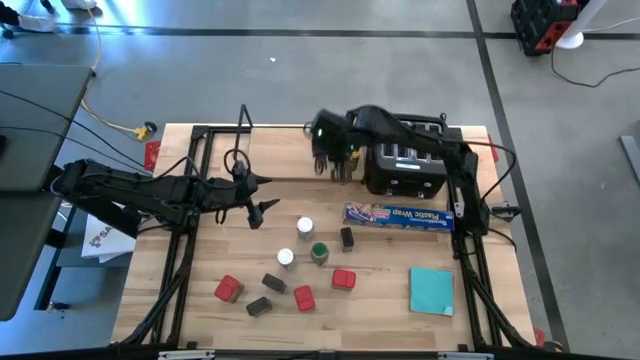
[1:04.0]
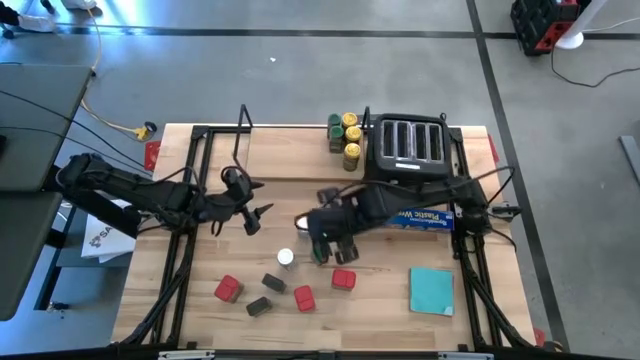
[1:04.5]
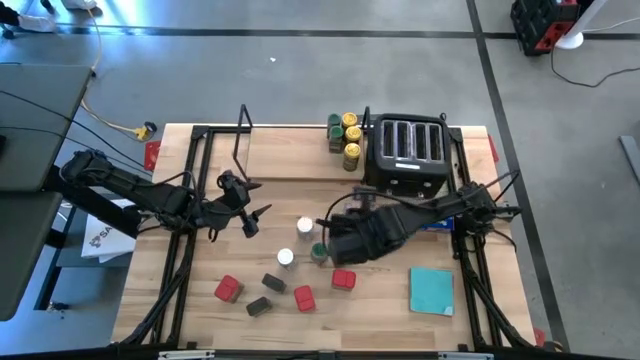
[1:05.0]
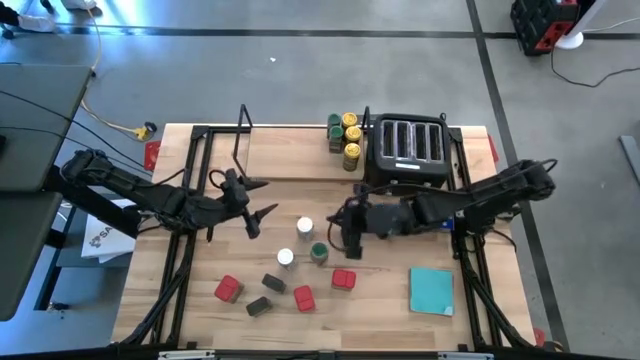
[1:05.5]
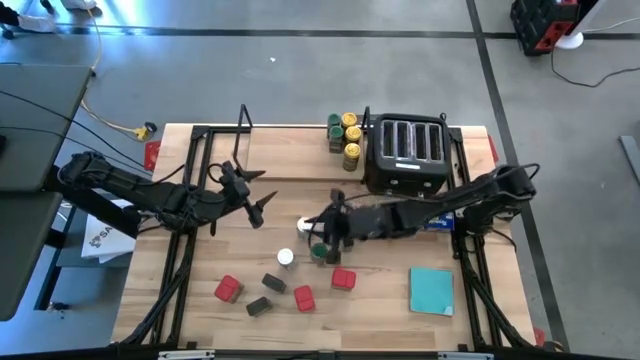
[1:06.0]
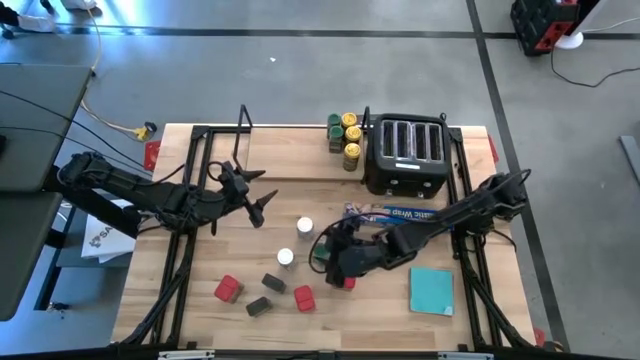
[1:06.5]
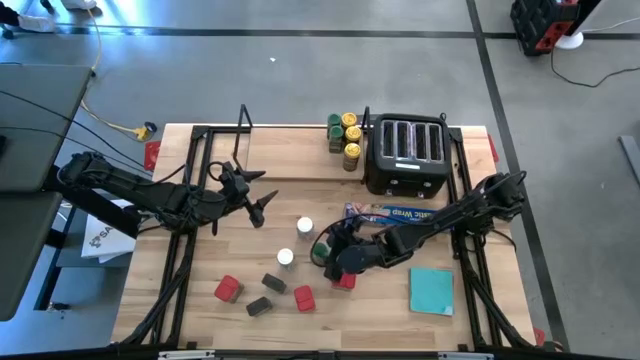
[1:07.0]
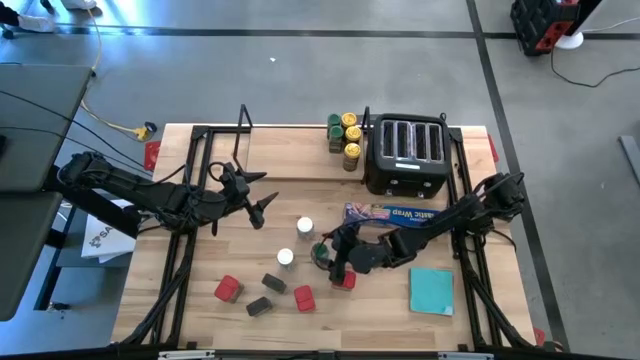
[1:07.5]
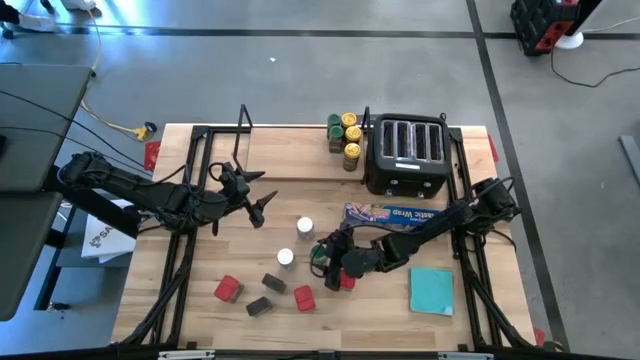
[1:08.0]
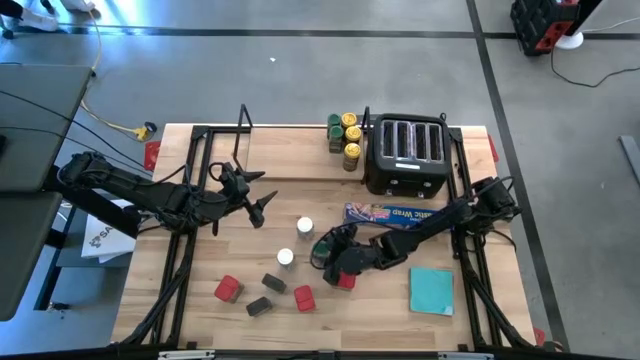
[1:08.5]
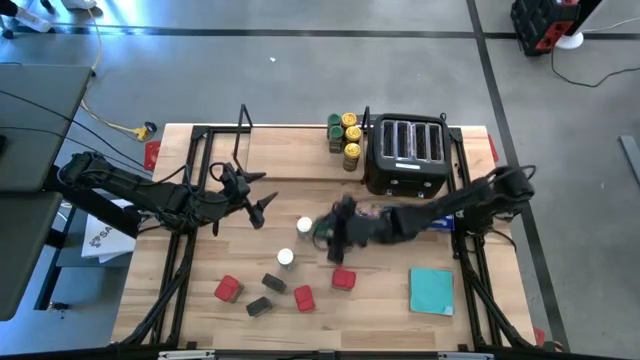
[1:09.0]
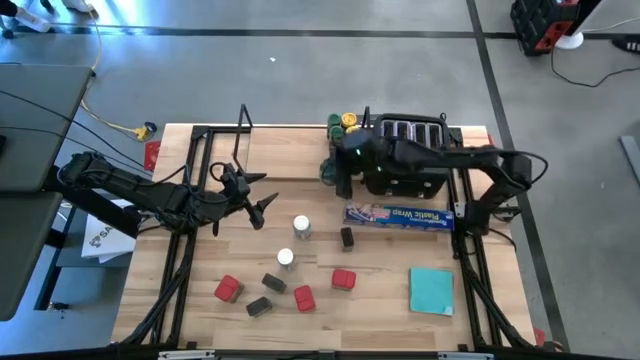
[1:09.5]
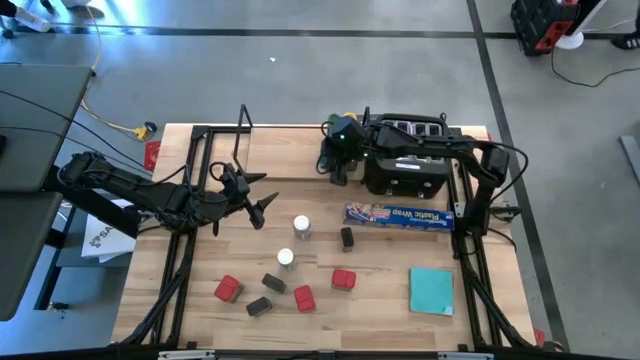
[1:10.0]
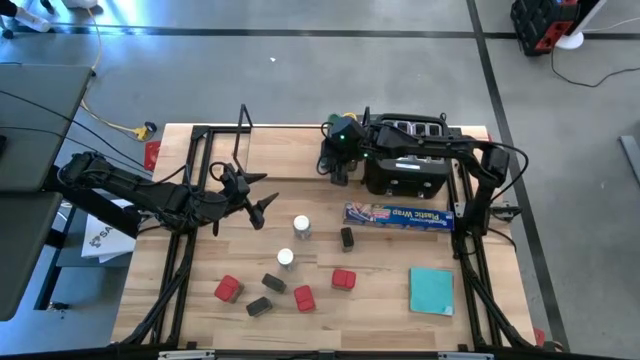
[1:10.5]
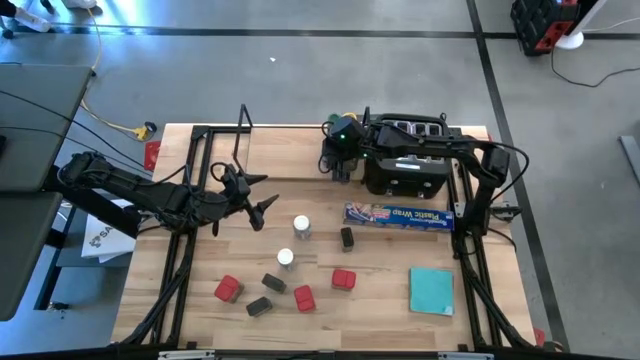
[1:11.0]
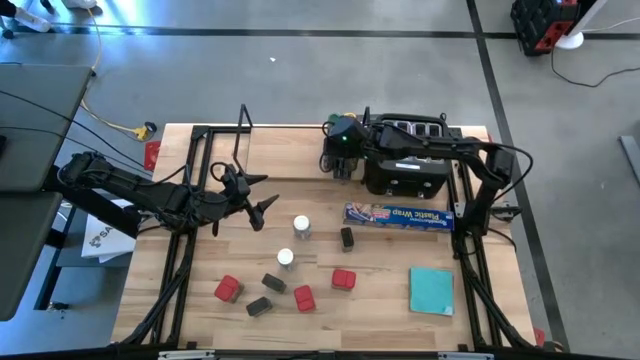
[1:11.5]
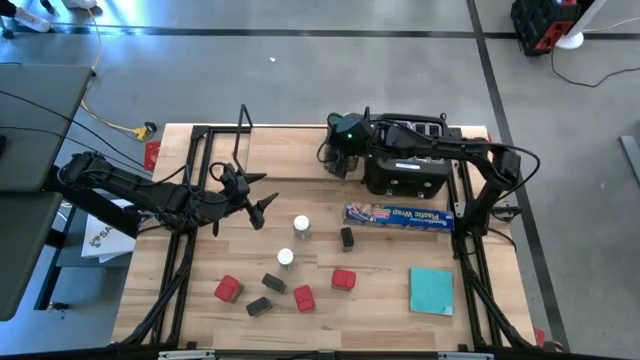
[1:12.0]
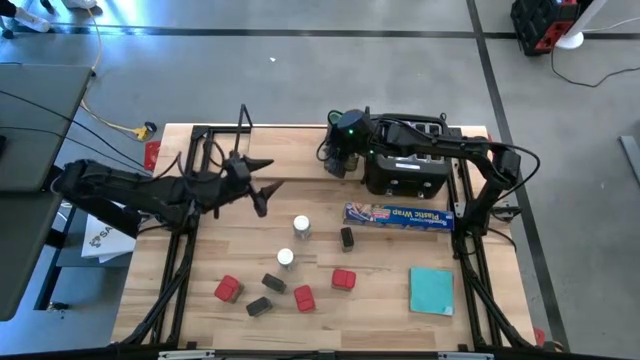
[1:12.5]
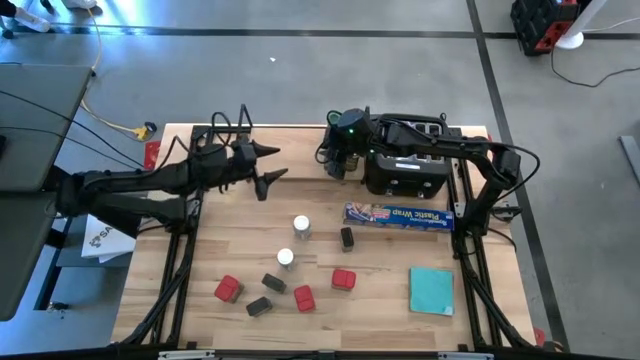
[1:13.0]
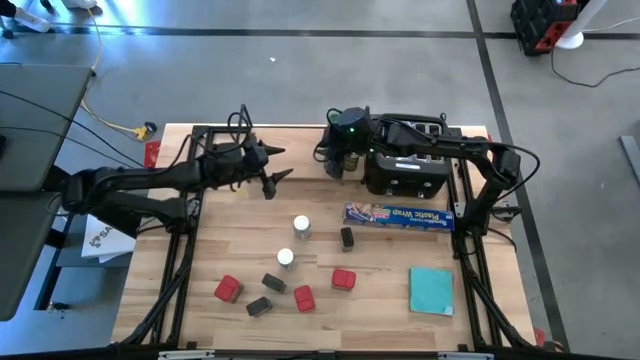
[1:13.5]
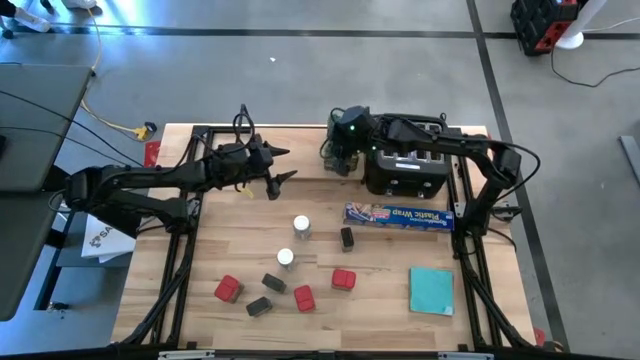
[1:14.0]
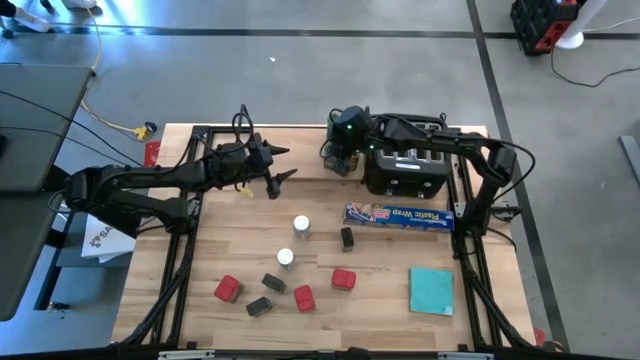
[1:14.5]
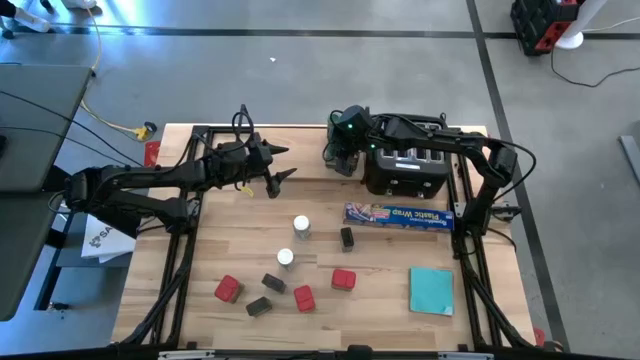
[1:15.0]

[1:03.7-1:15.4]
Task: Shelf spices
Put the green seasoning bottle on the shelf aligned with the other green seasoning bottle

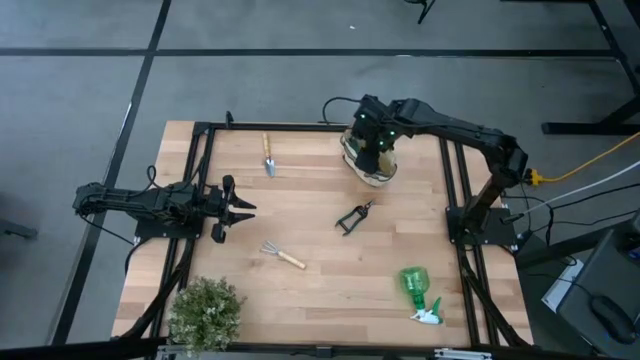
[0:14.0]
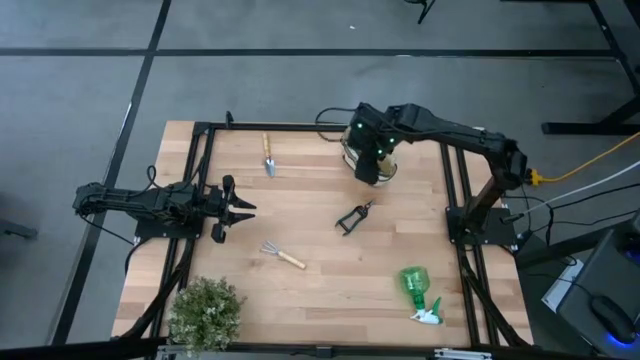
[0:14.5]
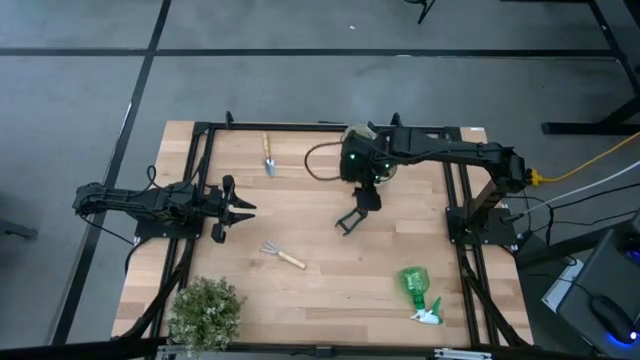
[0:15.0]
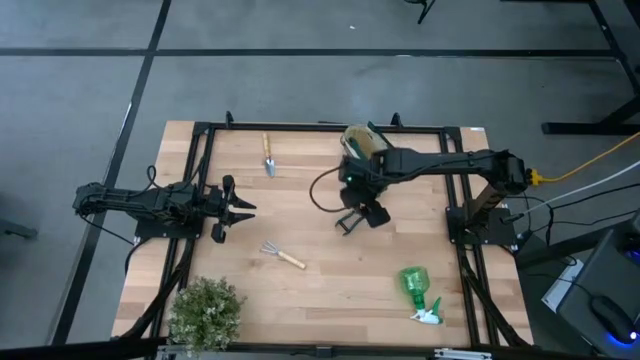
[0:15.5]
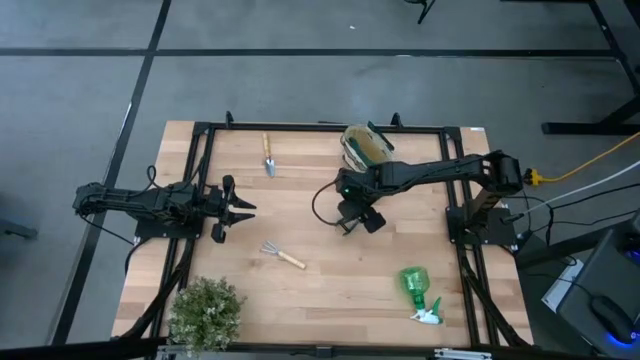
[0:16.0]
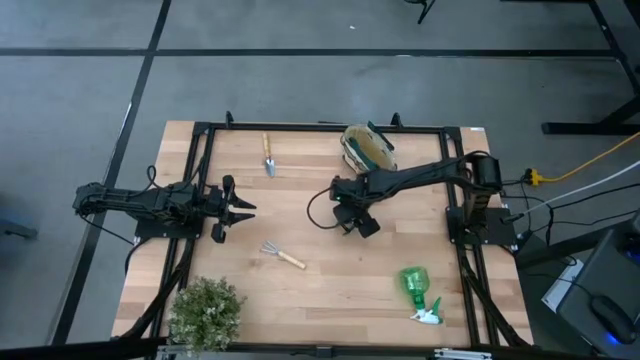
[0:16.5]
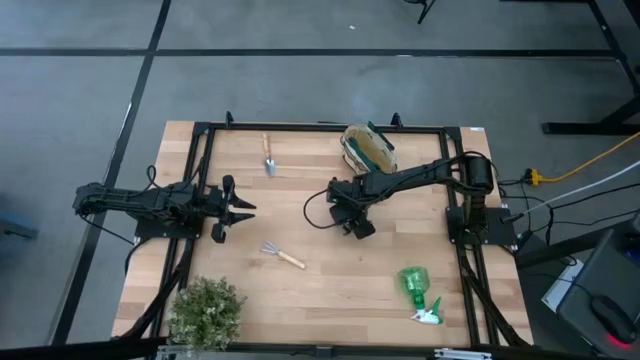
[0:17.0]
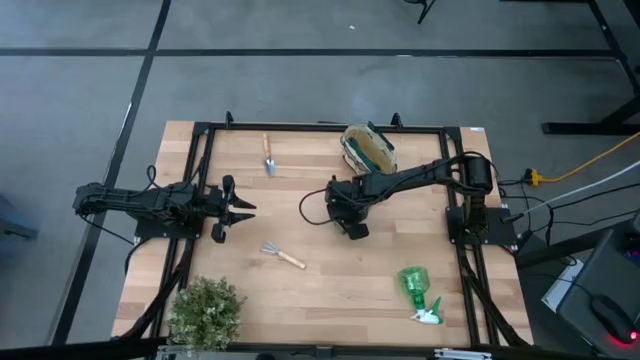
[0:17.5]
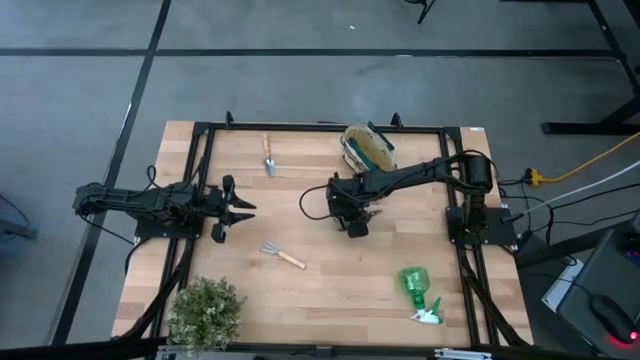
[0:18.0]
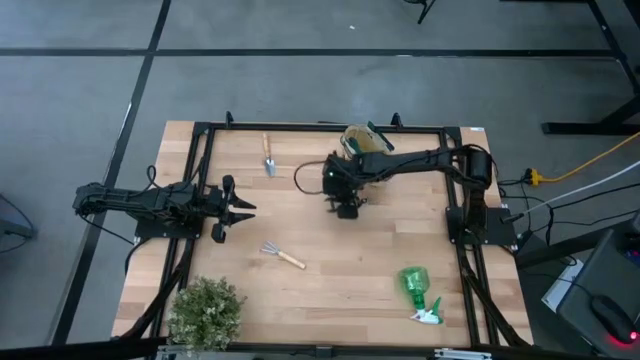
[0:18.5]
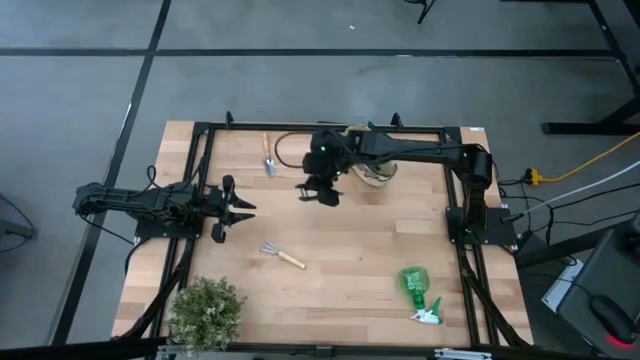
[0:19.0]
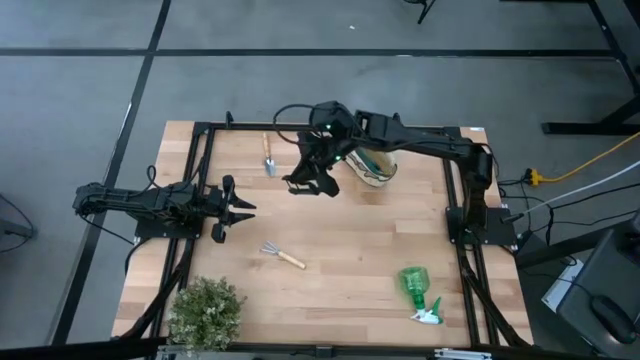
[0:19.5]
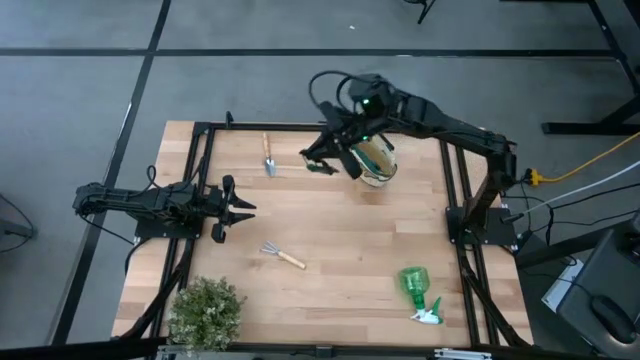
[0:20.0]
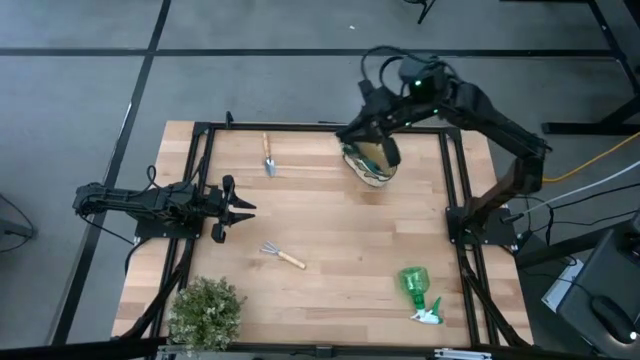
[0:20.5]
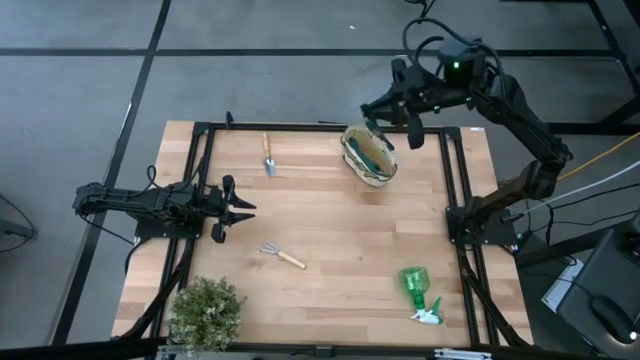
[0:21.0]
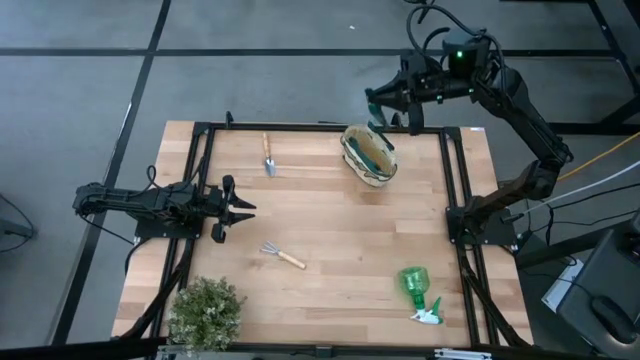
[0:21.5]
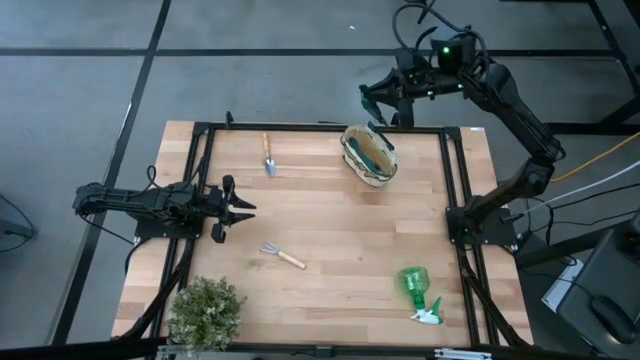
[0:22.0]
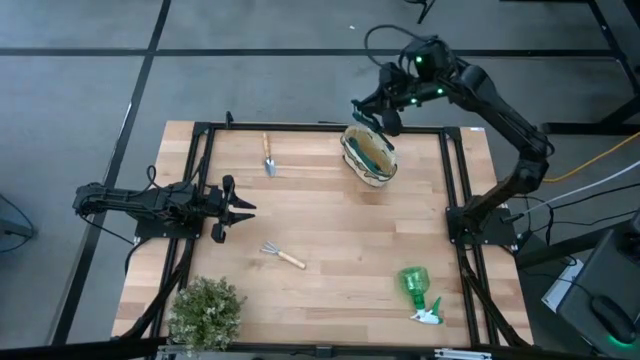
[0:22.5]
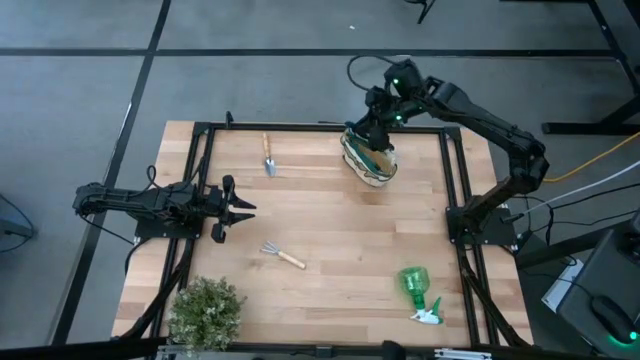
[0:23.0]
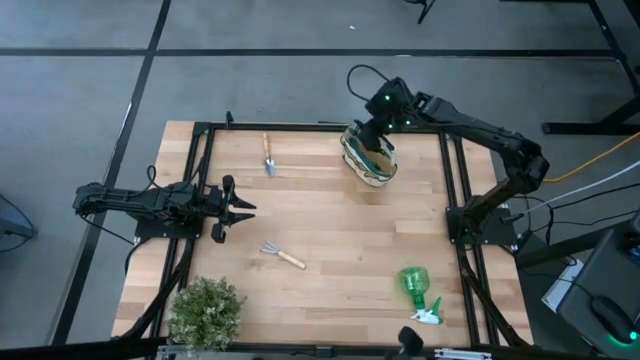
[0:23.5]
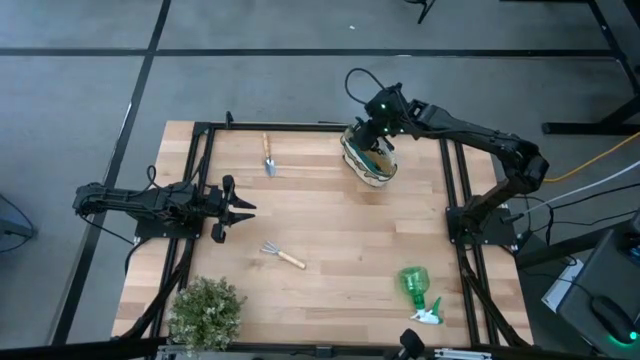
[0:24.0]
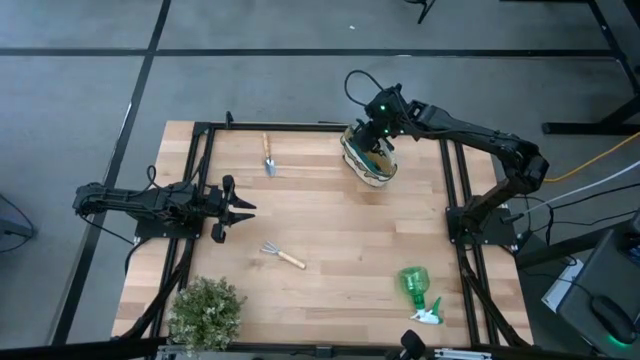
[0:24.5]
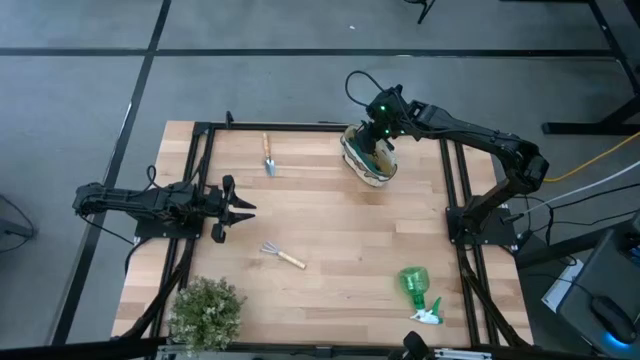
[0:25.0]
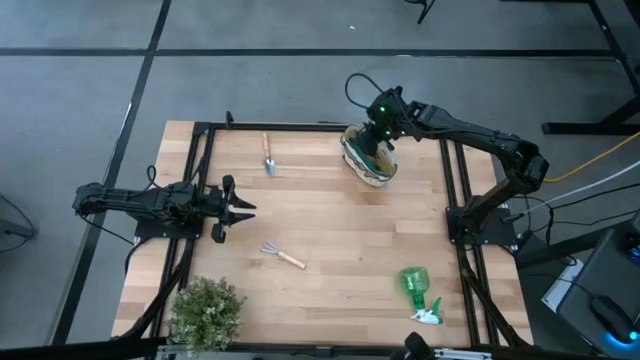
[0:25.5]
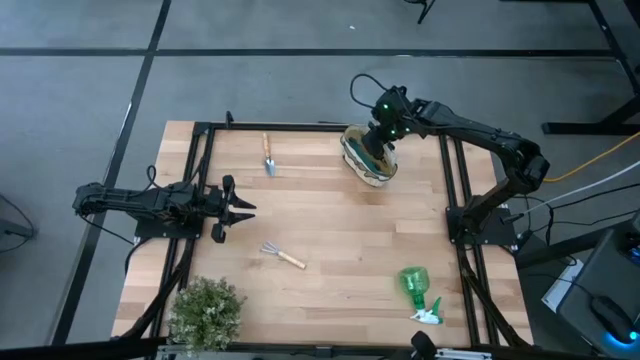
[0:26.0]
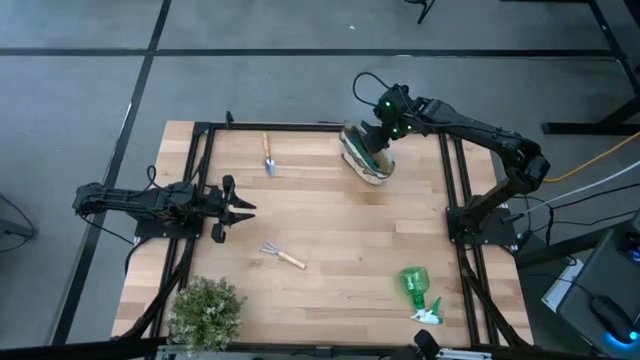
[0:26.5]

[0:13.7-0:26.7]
Task: Pick & Place Garden tools in Gardening bag
Put the cutter into the white bag
